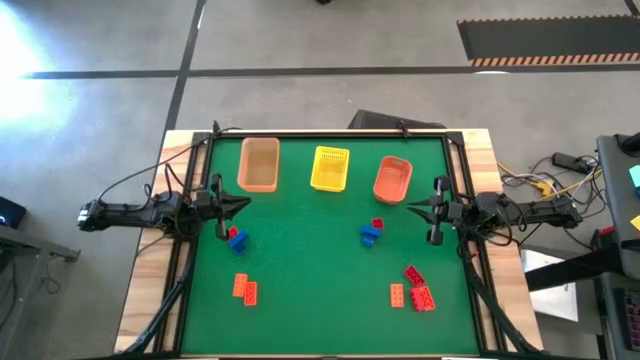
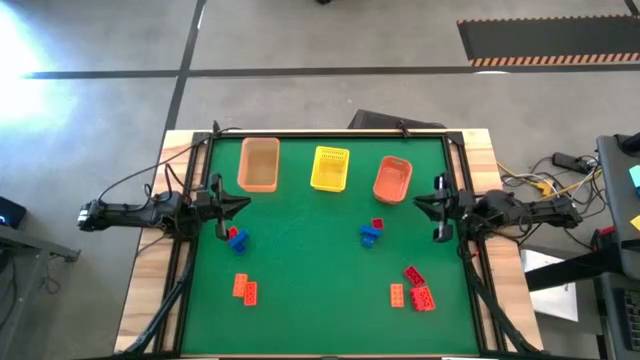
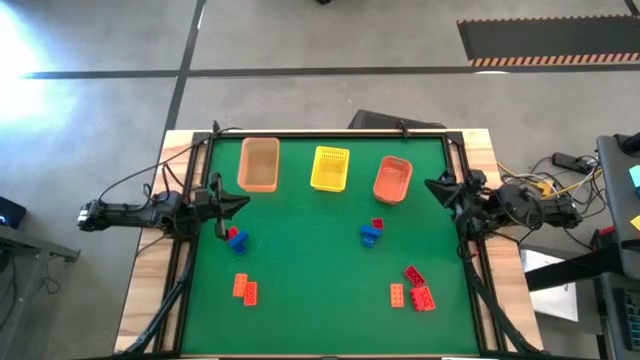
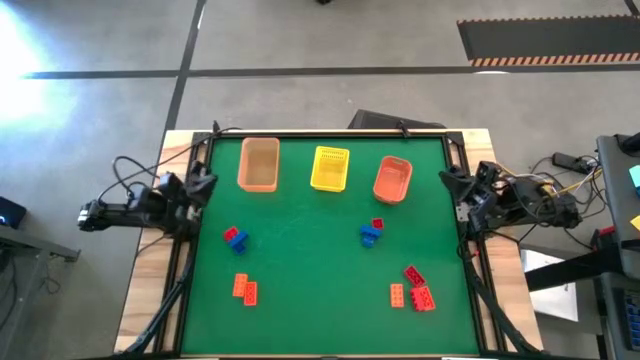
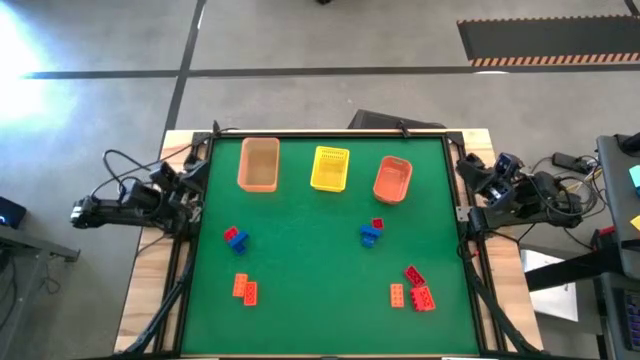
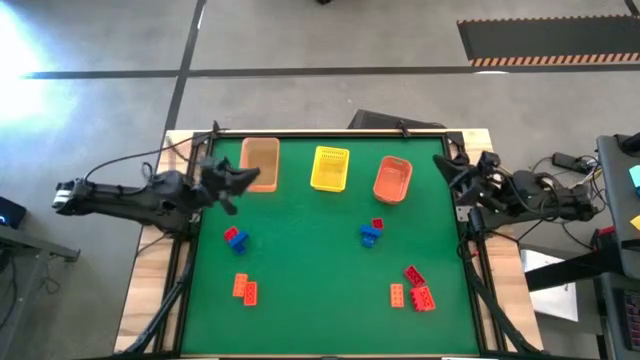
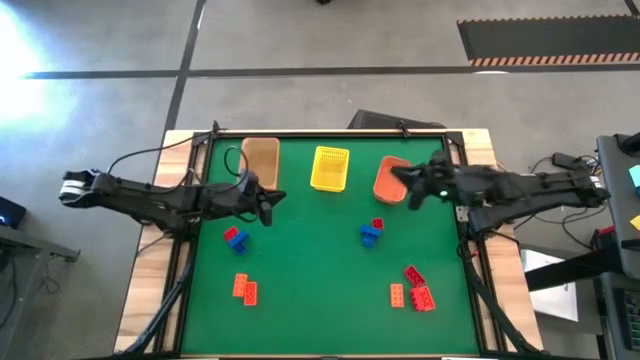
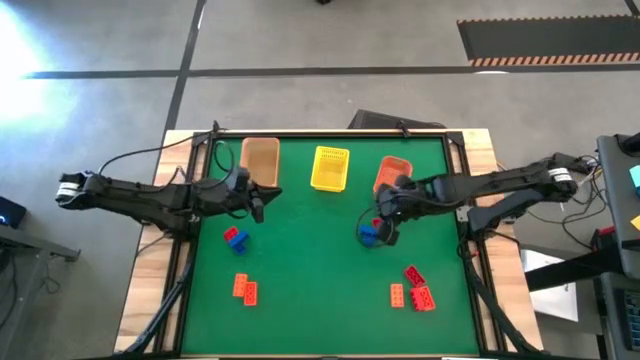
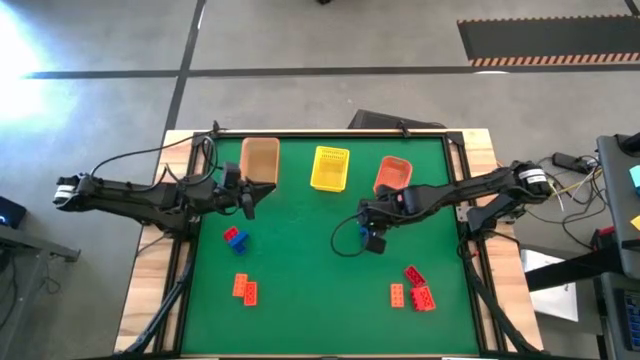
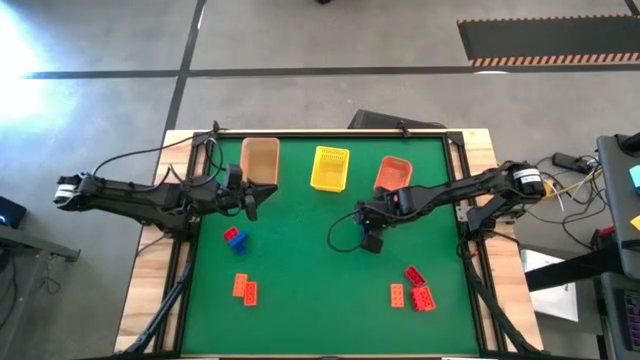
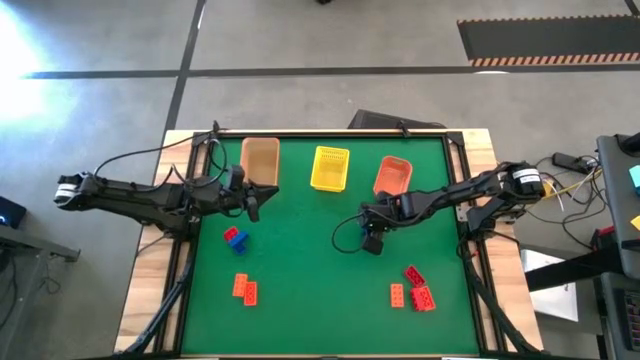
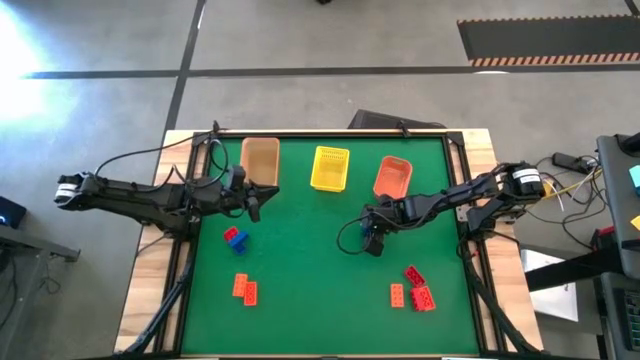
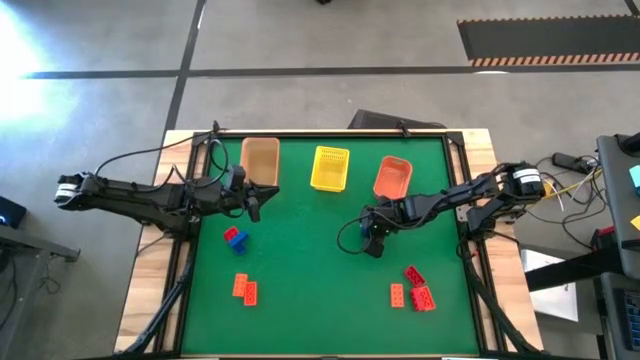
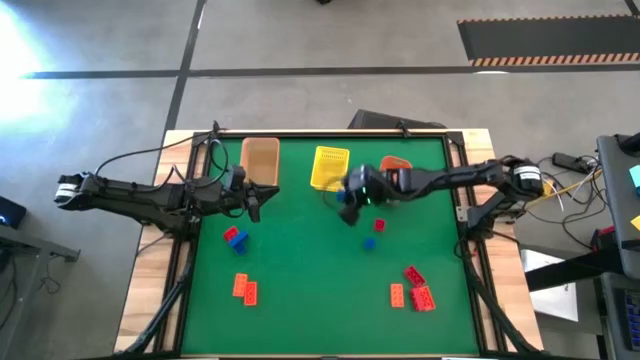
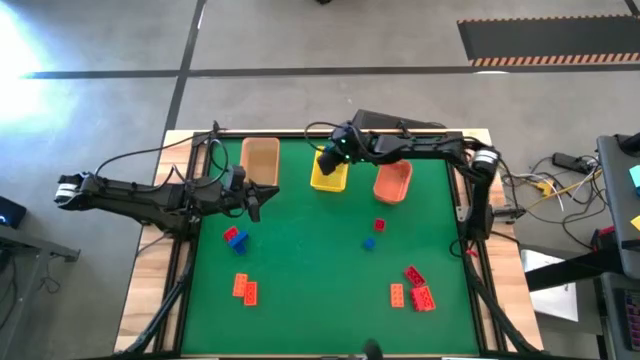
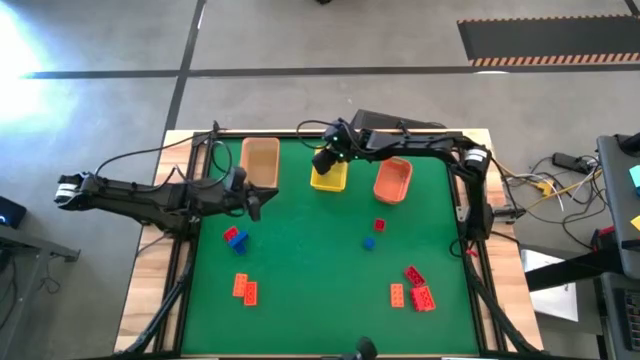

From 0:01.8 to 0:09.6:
Task: Sort & place blocks by color
Put the blue game piece into the yellow bin

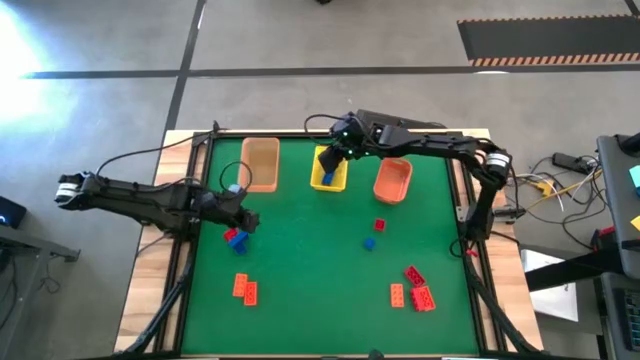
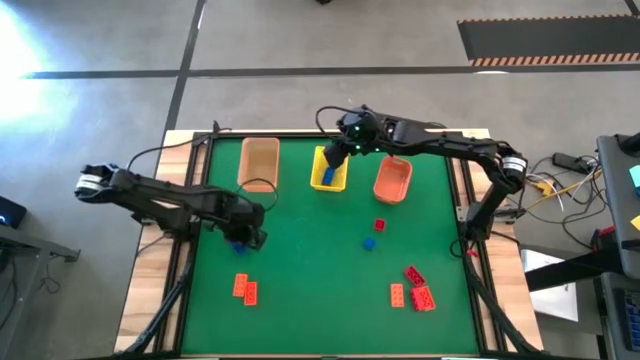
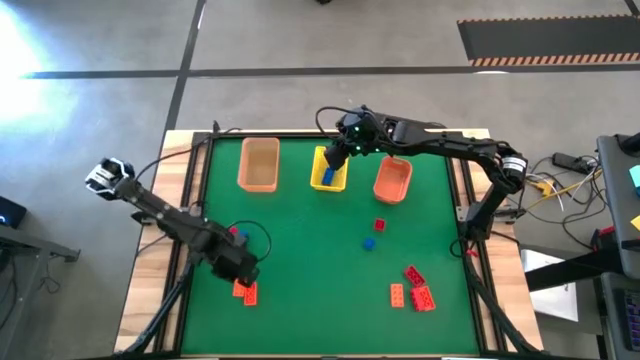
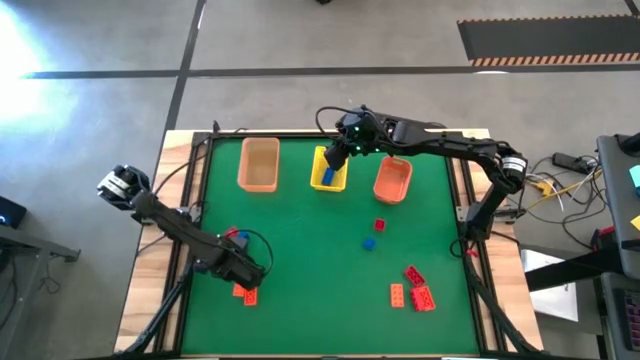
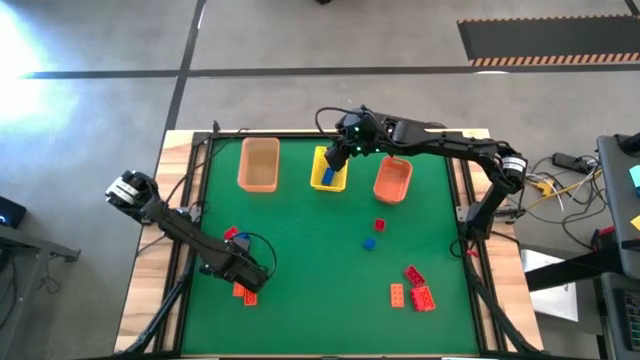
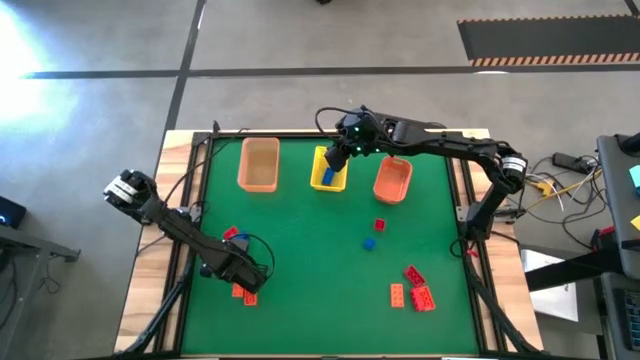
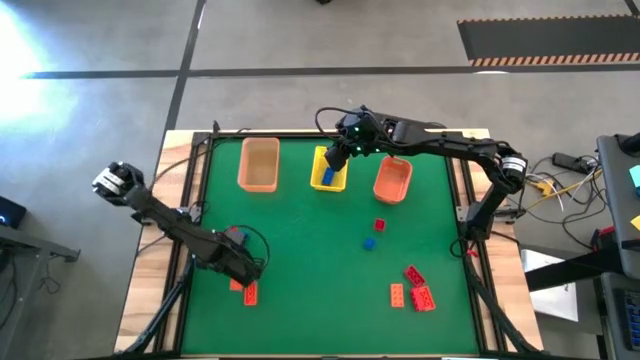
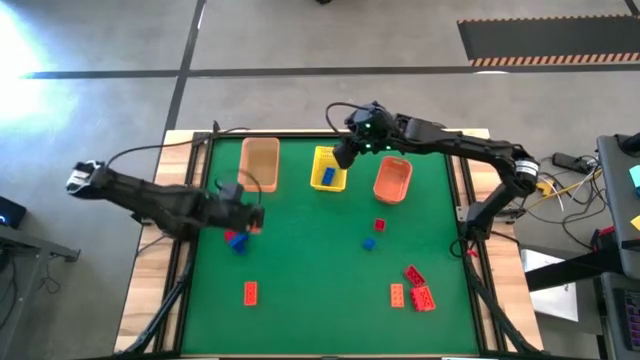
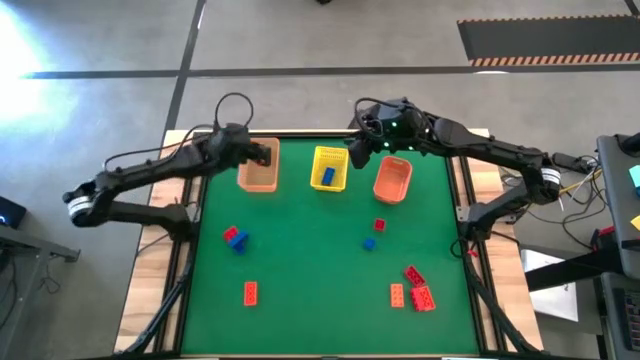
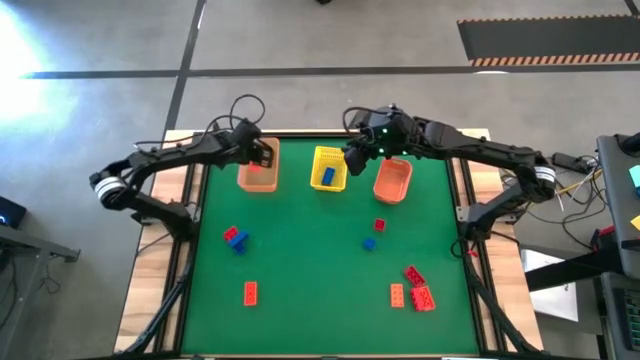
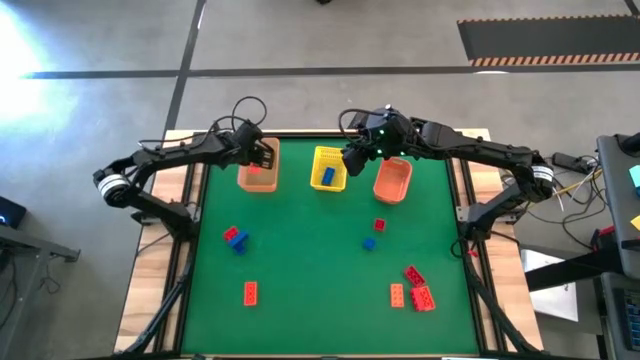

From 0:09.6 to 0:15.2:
Put the orange game piece into the light orange bin

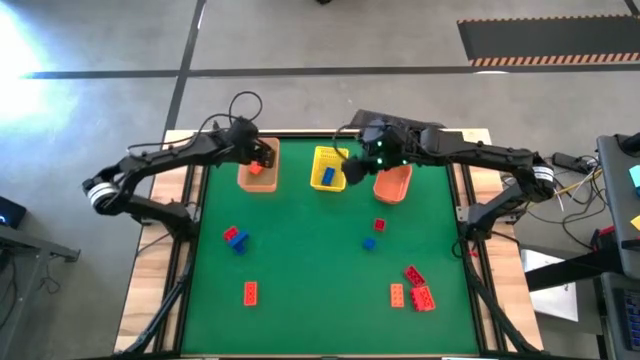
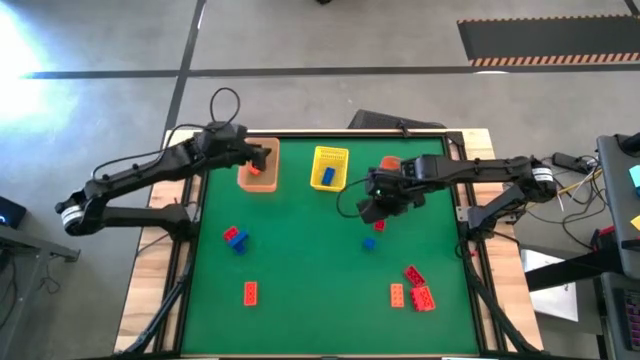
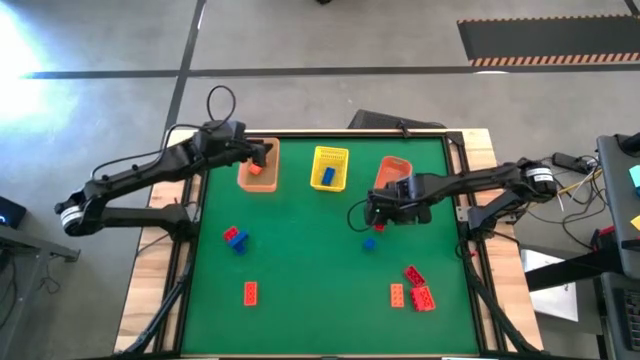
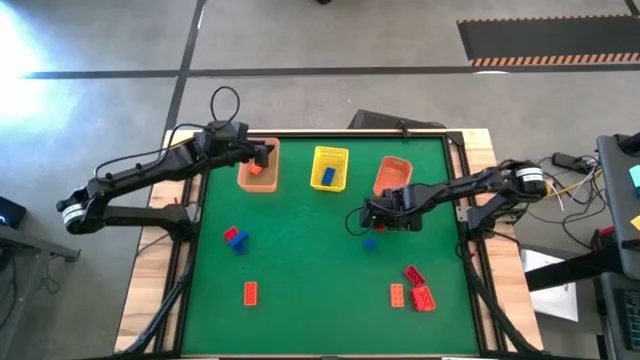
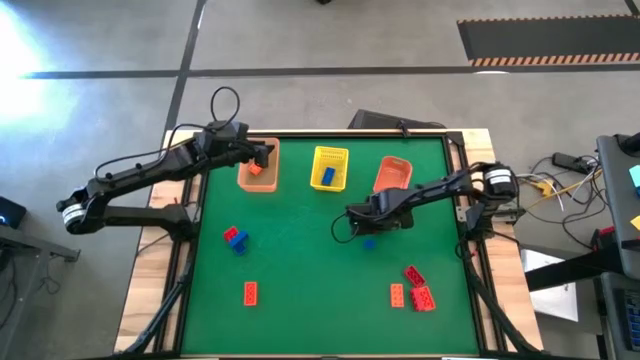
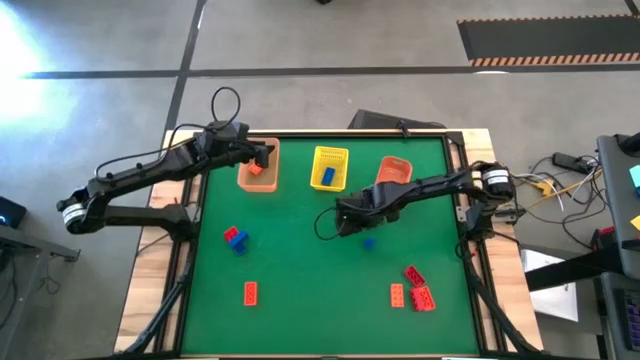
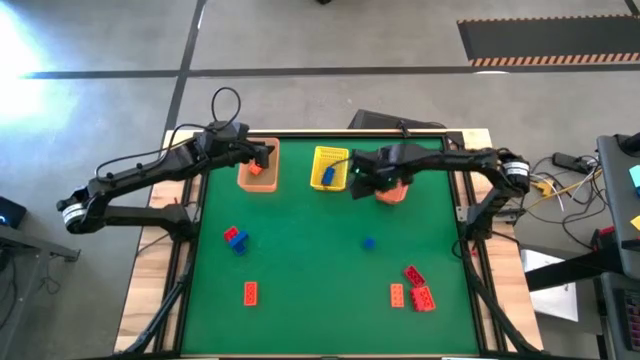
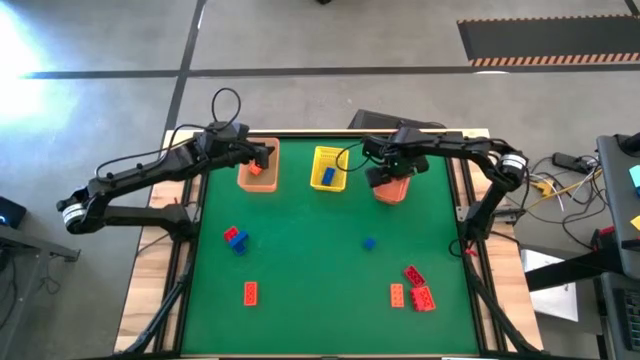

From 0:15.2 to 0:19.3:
Put the red game piece into the orange bin

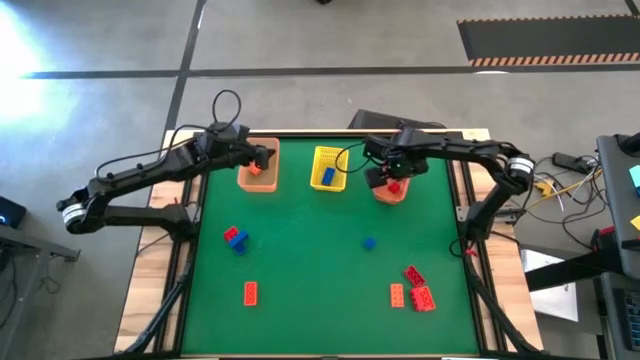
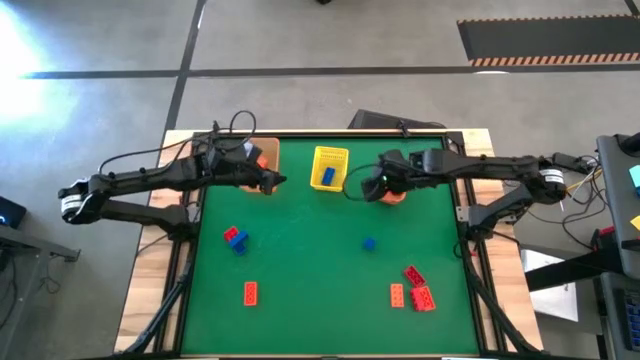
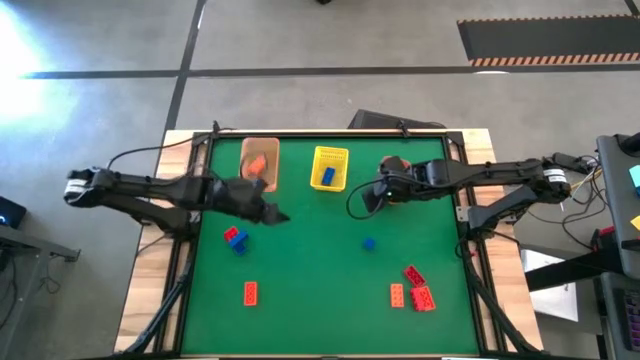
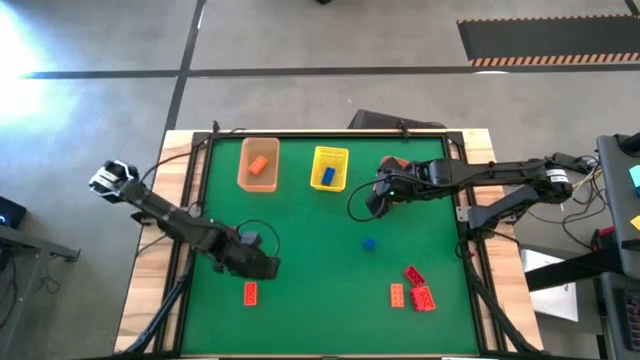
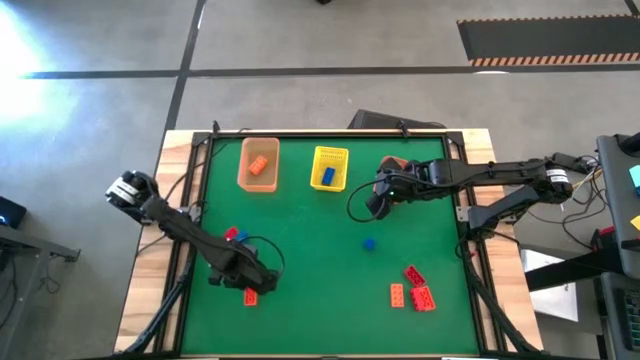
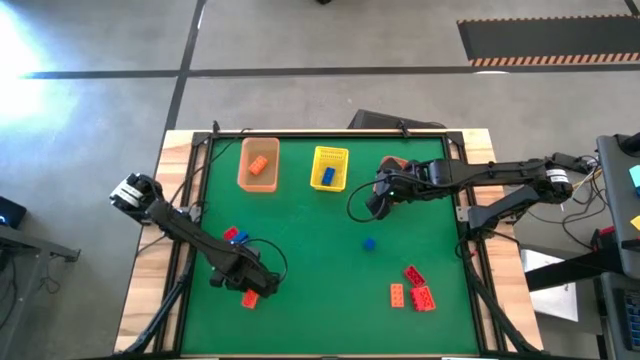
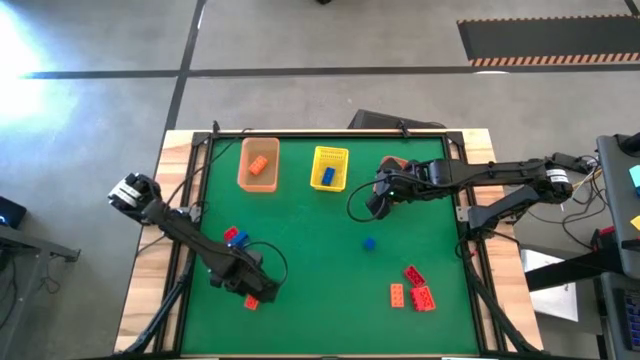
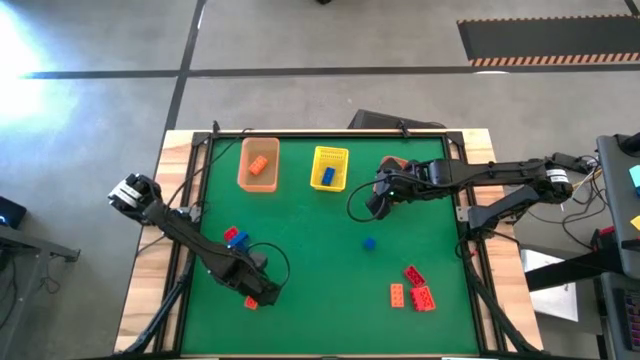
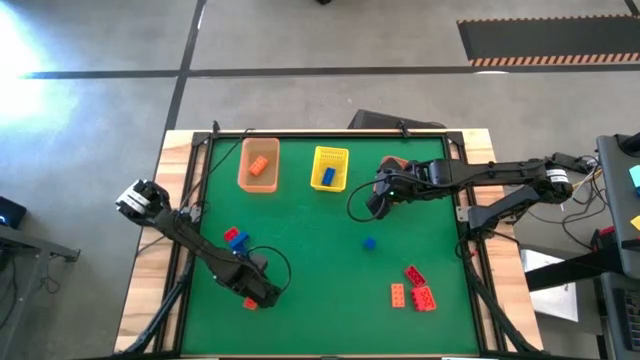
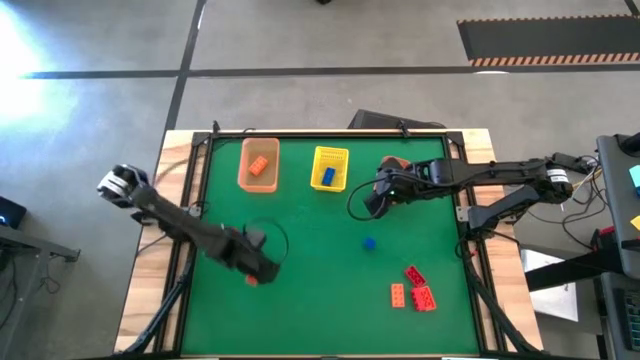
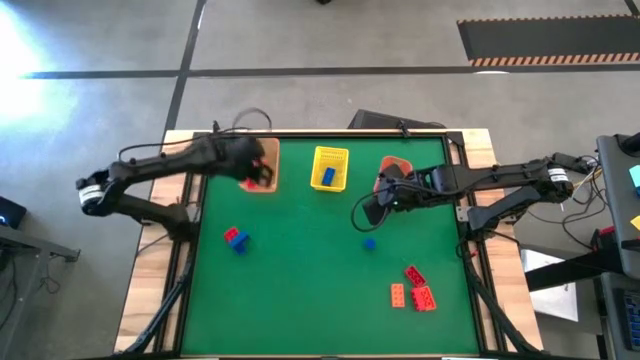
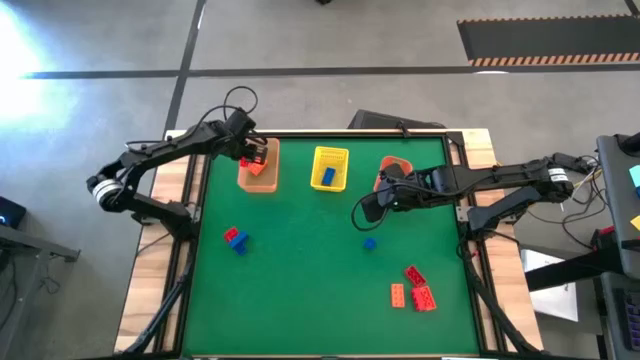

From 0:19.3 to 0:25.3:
Put the orange game piece into the light orange bin
